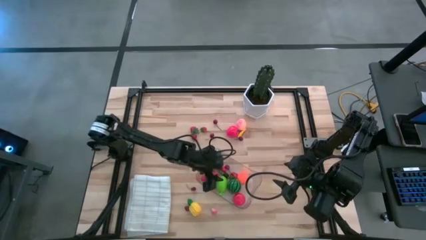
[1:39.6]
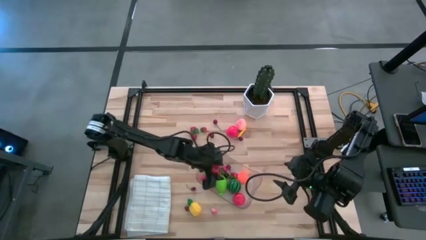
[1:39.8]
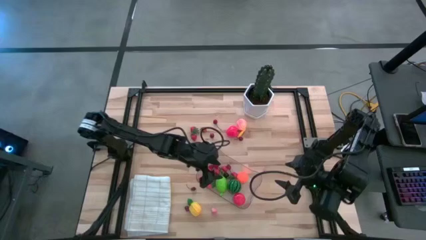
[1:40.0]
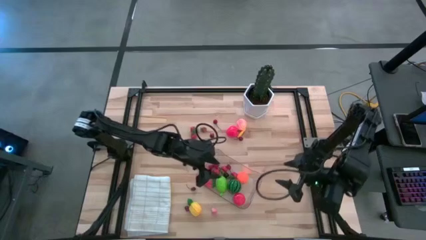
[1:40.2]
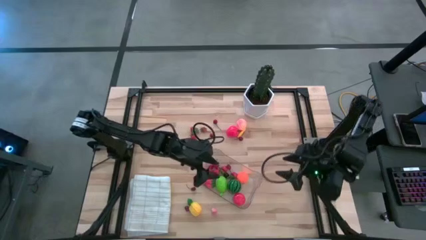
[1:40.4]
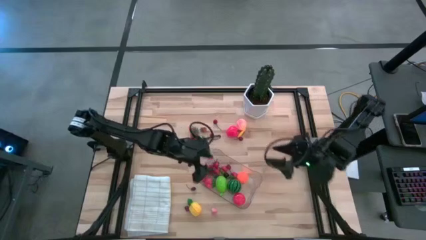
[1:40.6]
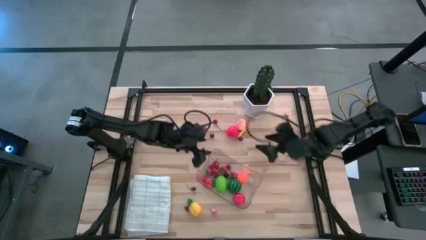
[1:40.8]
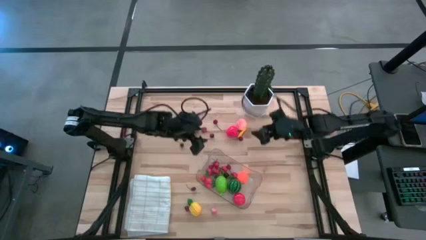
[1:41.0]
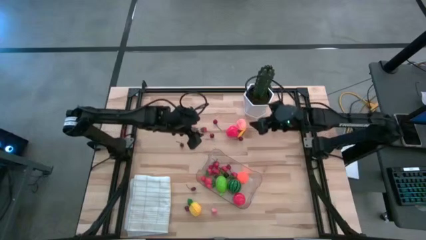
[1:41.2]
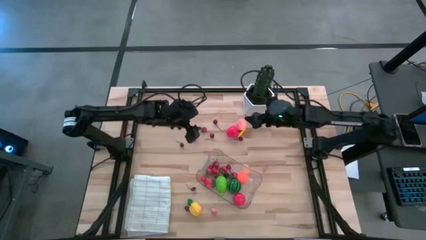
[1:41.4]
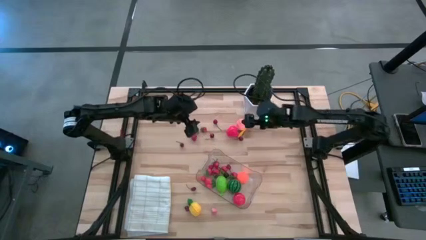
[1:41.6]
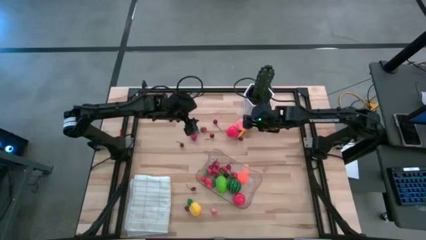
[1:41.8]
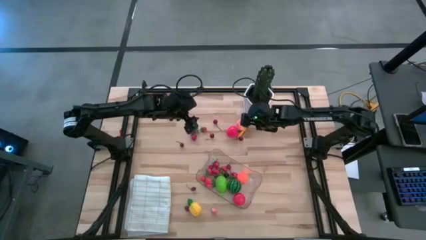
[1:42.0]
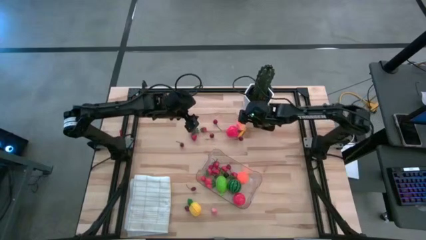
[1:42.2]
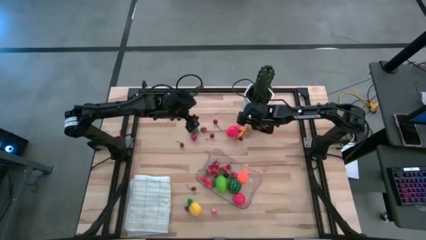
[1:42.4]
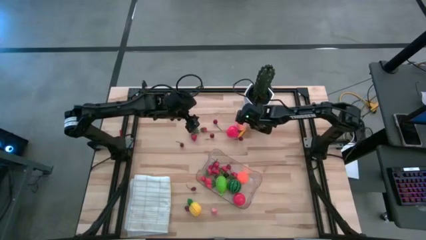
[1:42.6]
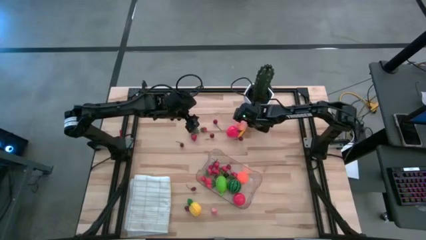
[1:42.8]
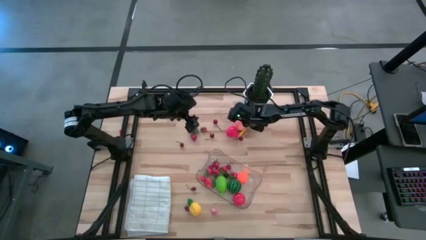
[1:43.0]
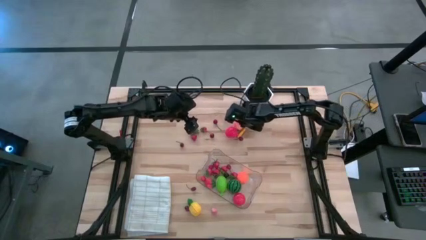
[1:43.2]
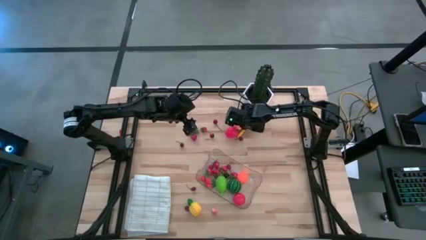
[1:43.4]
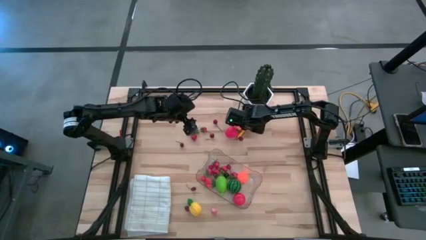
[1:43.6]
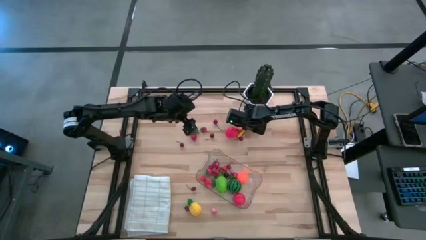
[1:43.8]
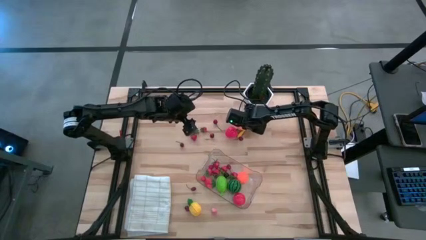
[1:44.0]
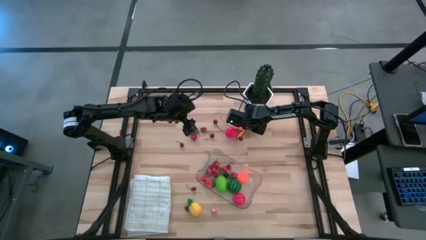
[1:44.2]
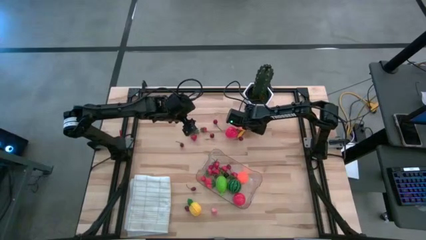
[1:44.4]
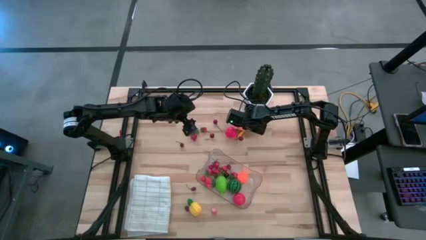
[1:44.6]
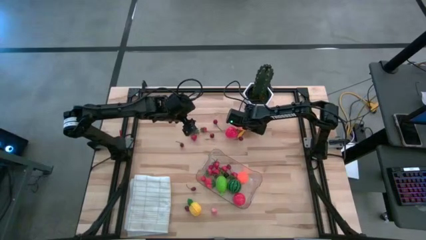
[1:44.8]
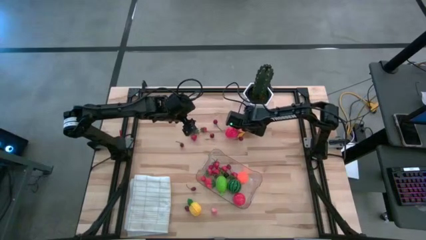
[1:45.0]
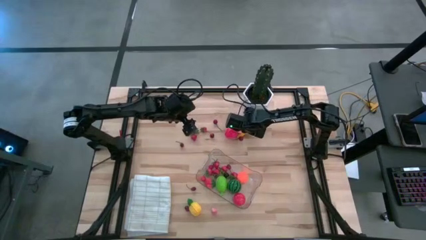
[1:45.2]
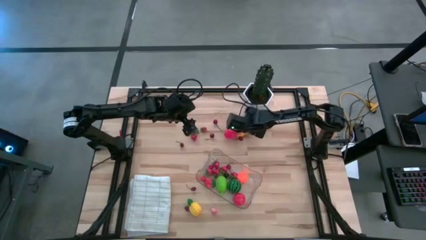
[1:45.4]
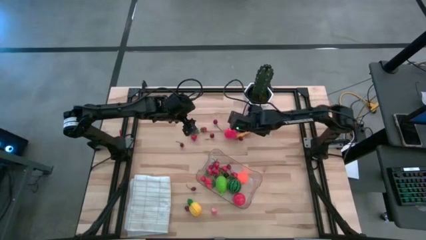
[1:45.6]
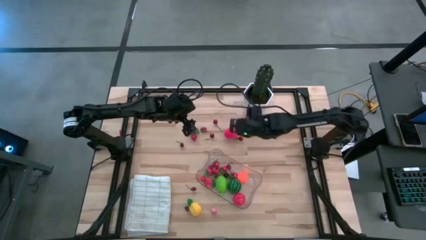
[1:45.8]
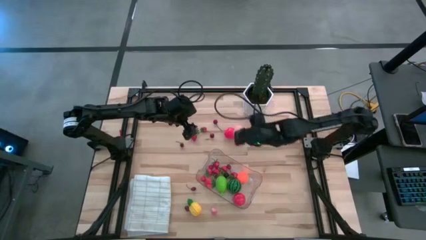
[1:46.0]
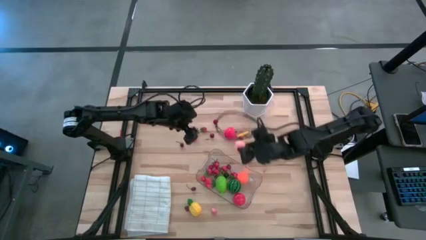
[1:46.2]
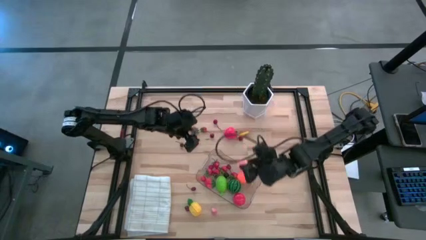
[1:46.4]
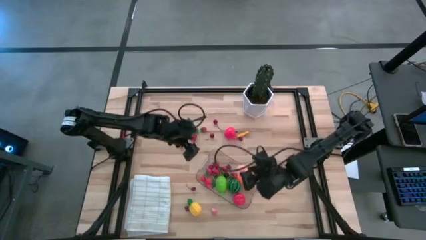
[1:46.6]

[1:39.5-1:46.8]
Task: Pick and placing Produce into tupperware
Put the pink peach into the transparent bin

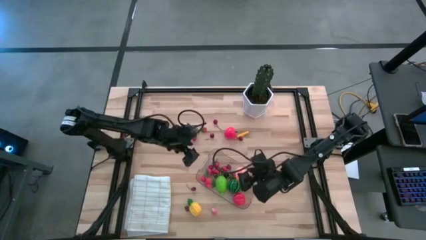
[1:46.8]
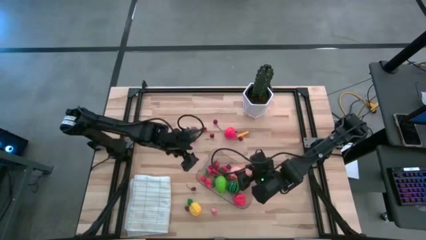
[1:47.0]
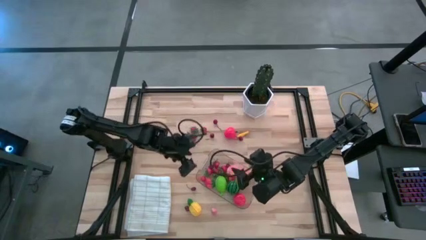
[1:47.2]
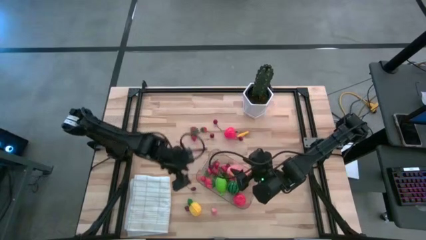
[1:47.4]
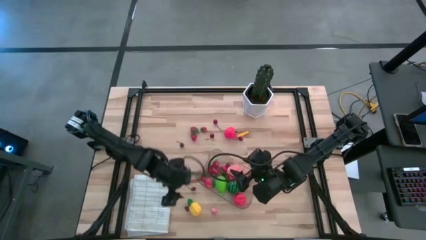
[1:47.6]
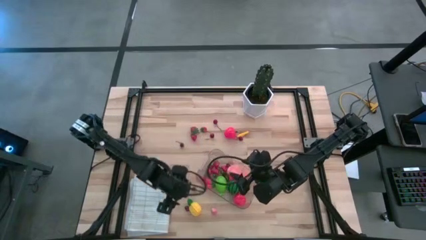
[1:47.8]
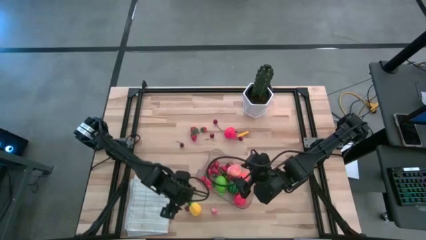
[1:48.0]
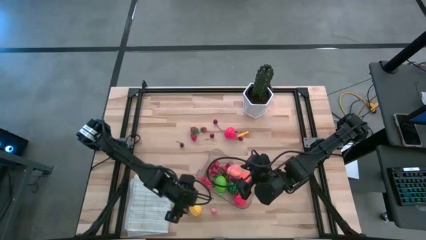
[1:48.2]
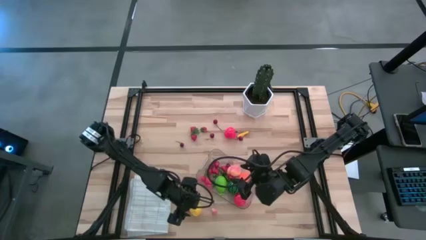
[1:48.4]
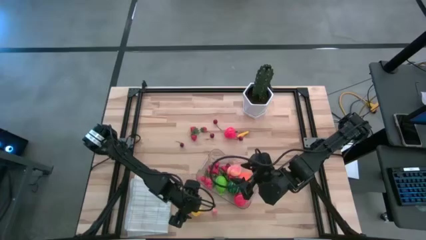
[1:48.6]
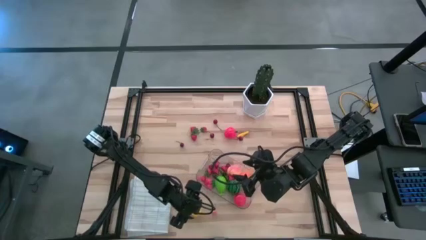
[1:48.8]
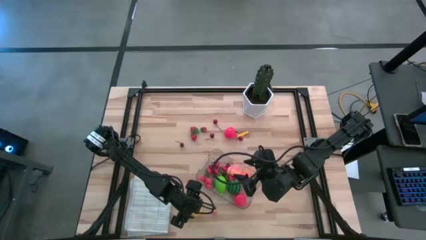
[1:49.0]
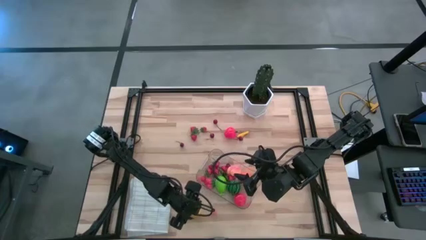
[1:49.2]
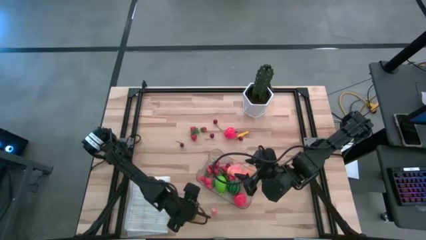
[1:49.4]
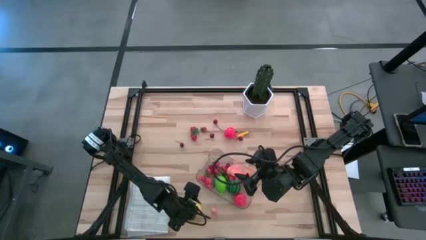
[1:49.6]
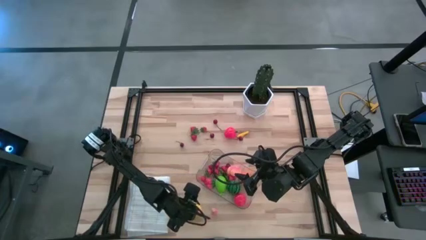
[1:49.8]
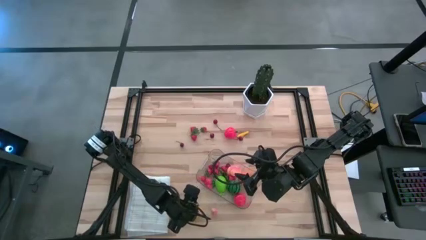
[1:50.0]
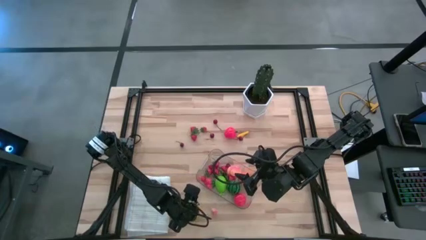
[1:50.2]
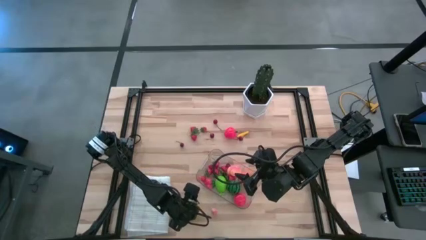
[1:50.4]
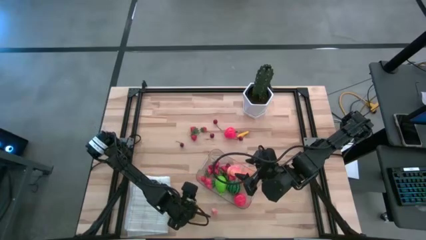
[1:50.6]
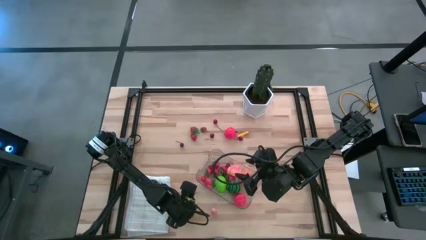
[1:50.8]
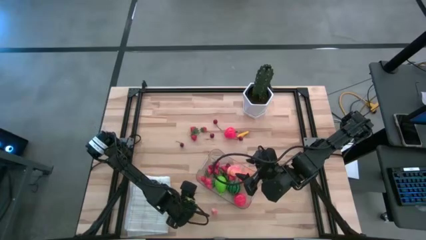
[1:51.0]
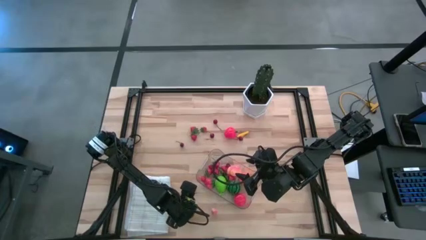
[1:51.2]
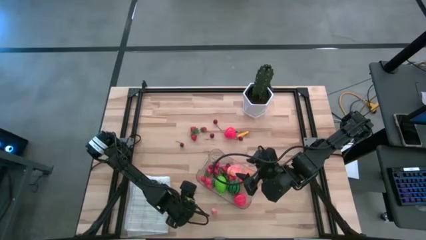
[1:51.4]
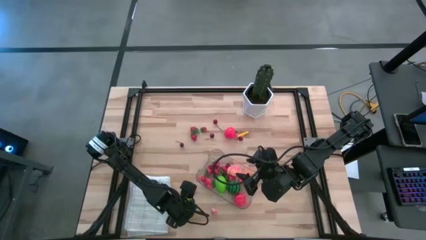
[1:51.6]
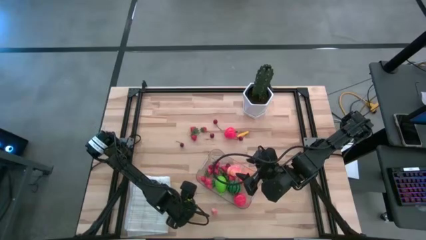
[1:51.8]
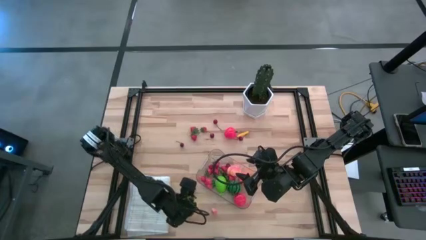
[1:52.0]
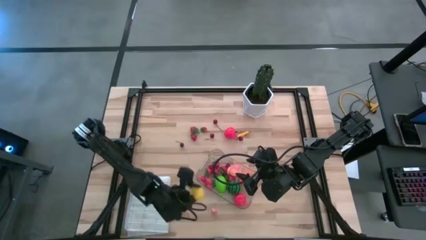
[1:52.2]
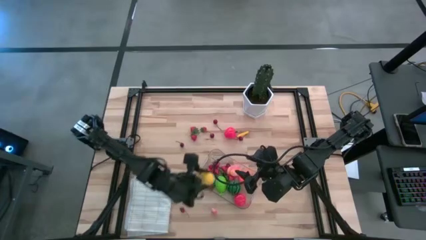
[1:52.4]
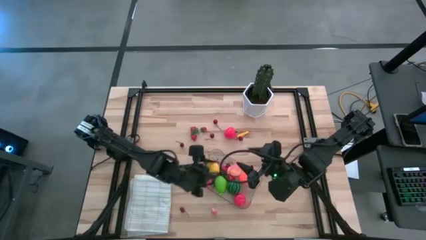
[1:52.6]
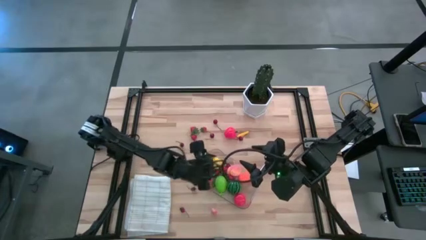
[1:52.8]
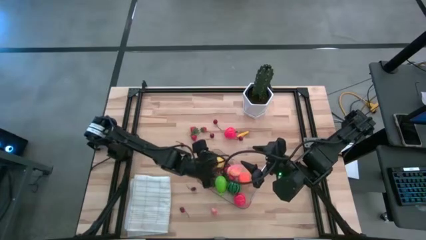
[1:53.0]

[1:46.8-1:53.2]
Put the yellow pineapple into the transparent bin

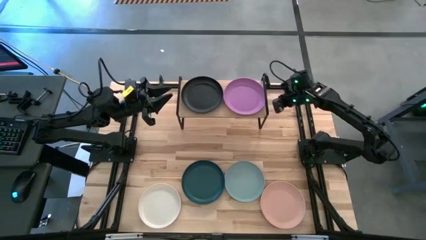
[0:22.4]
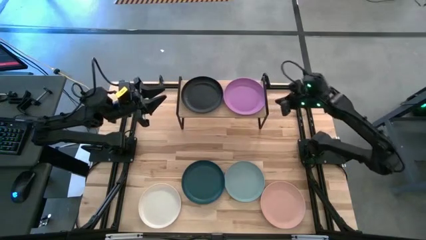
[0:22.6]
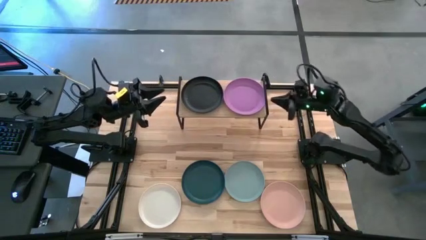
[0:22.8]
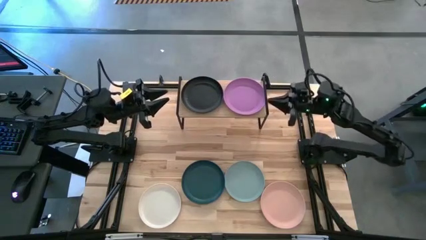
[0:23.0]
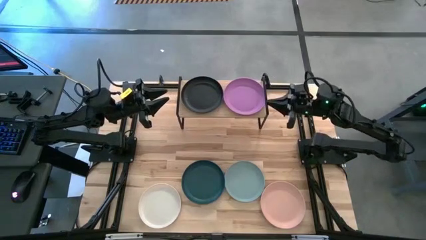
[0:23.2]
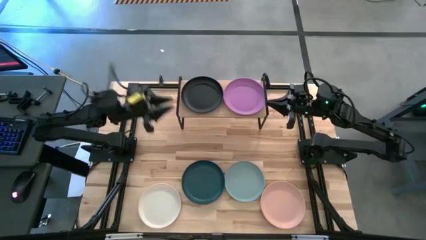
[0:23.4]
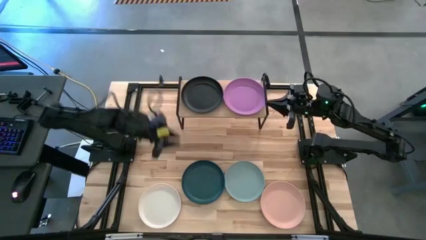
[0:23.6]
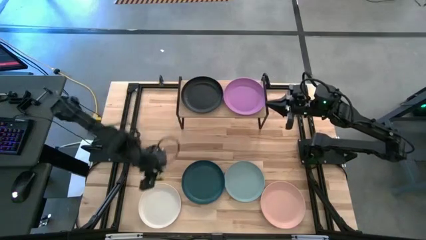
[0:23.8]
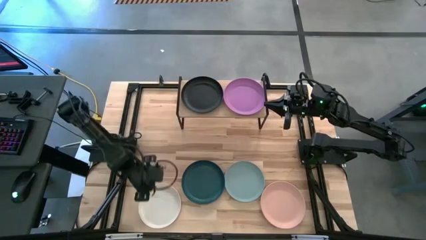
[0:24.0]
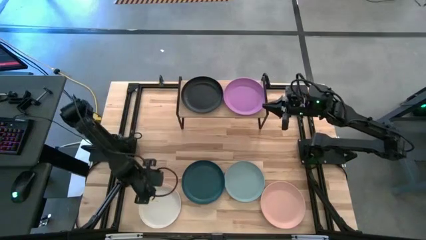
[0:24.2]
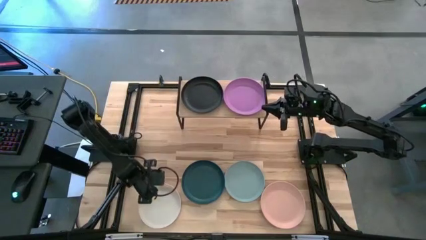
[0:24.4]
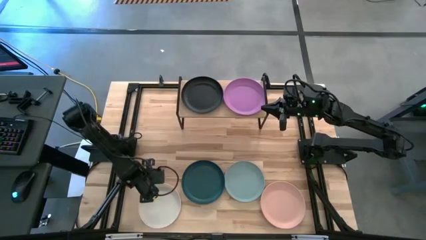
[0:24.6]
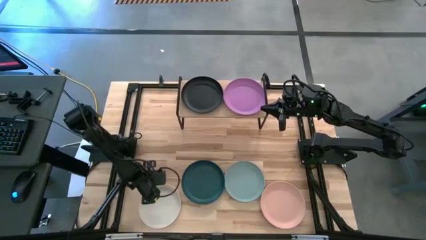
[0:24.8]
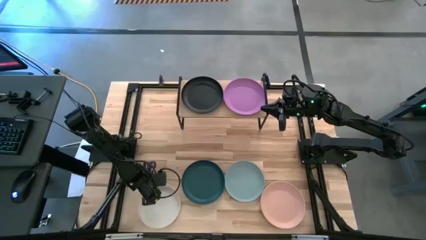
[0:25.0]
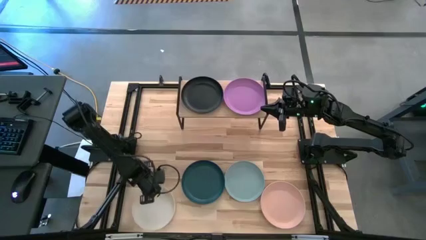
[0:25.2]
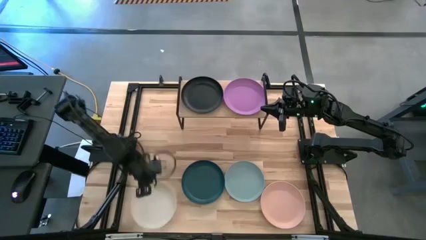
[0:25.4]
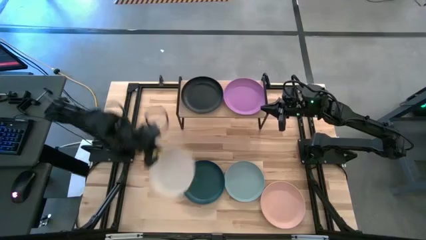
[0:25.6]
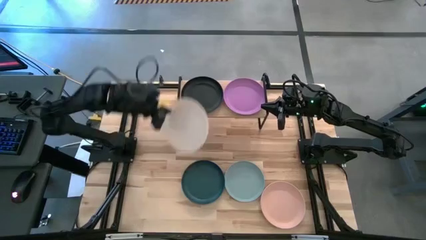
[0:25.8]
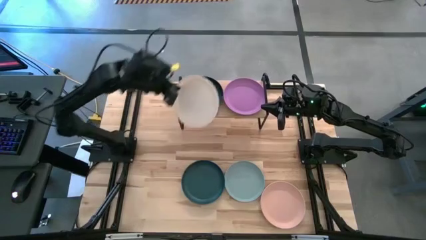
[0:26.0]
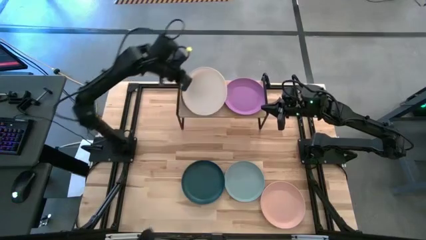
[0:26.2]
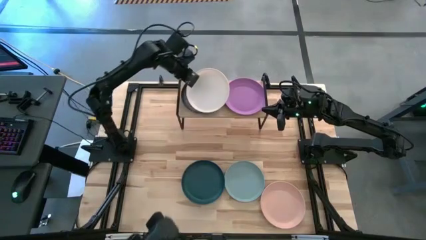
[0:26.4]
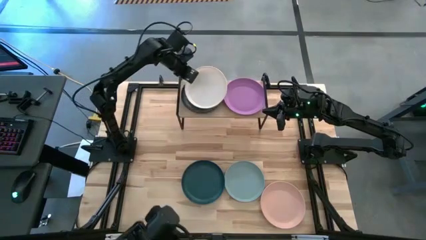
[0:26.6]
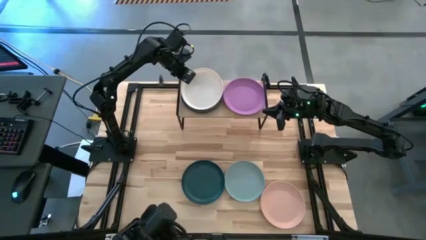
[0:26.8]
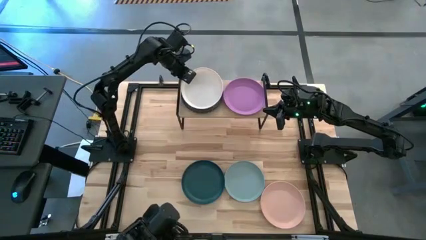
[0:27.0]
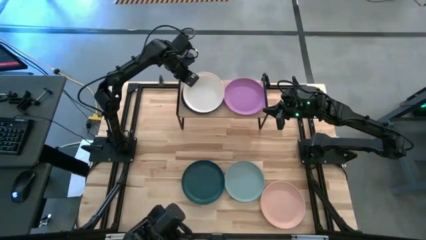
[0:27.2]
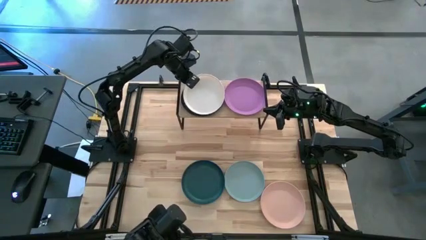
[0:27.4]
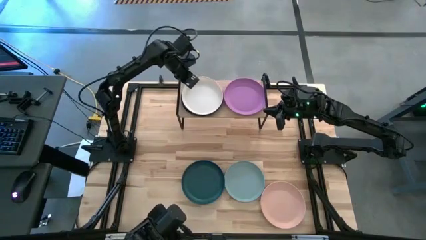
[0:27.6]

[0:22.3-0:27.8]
Task: Place and stack plates onto a shelf
Stack the white plate on top of the black plate on the shelf
